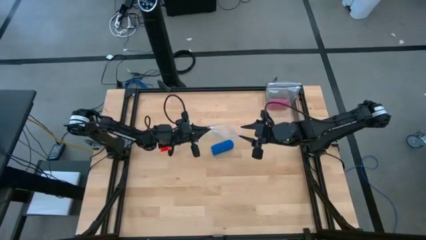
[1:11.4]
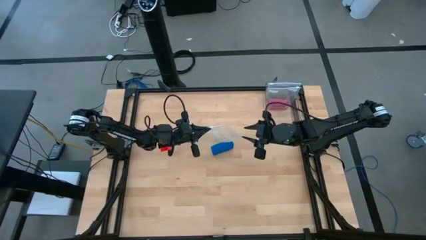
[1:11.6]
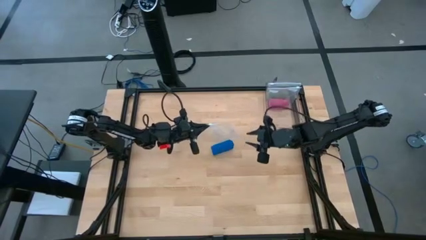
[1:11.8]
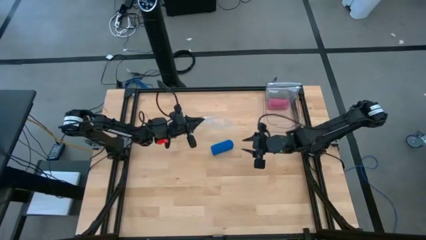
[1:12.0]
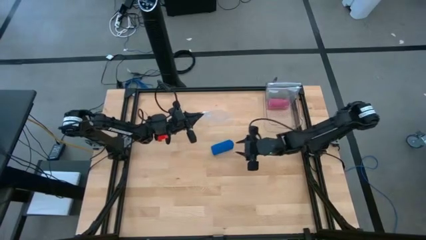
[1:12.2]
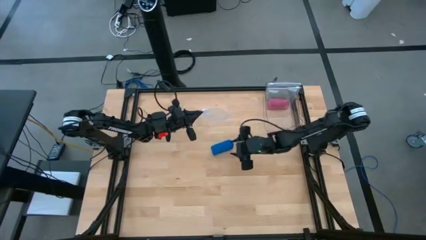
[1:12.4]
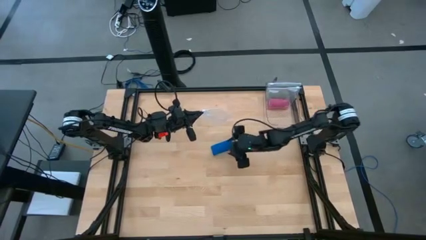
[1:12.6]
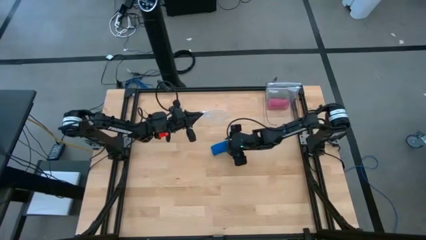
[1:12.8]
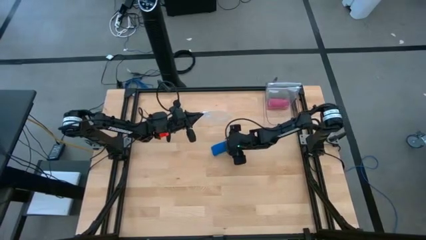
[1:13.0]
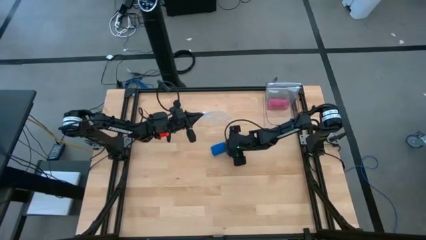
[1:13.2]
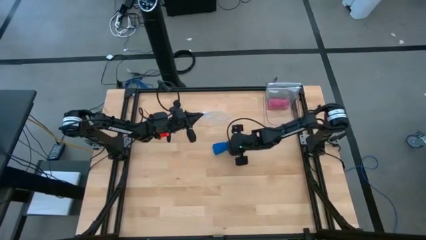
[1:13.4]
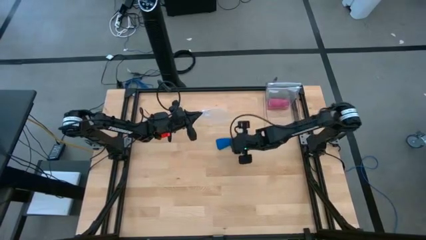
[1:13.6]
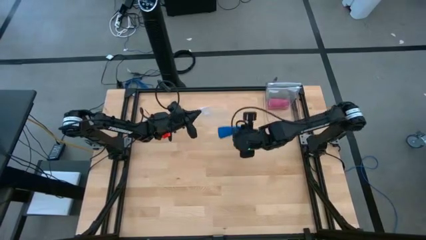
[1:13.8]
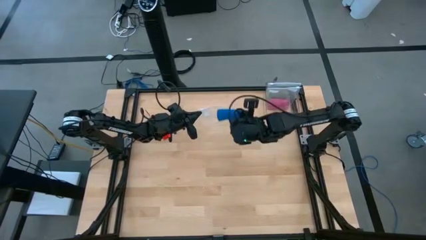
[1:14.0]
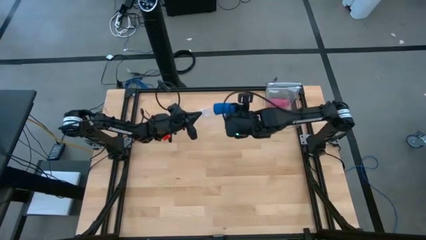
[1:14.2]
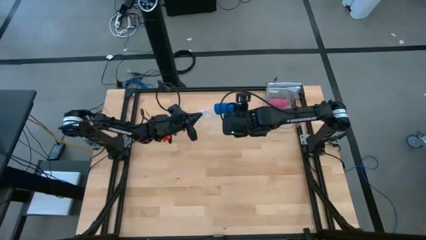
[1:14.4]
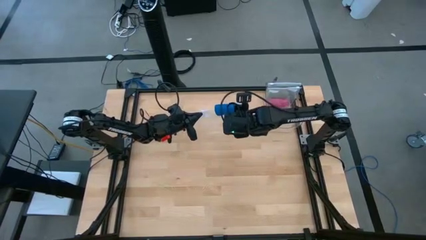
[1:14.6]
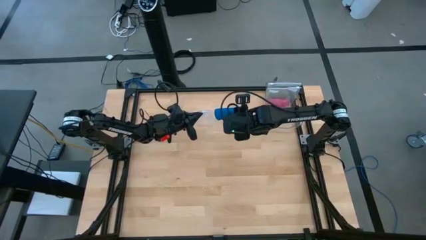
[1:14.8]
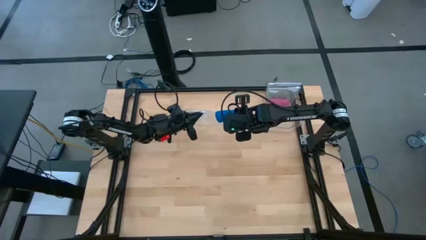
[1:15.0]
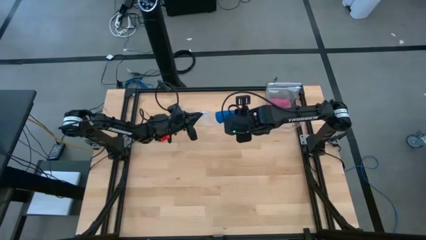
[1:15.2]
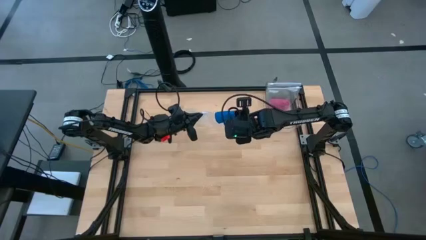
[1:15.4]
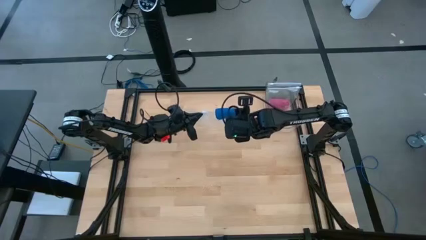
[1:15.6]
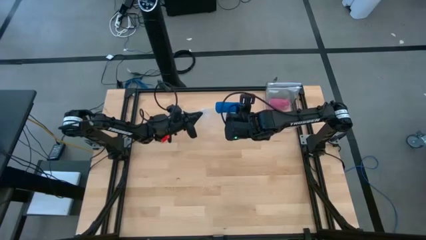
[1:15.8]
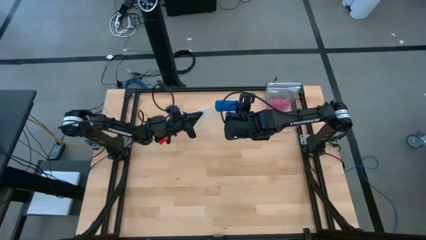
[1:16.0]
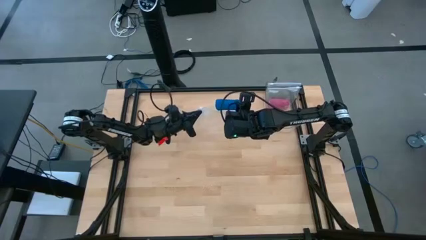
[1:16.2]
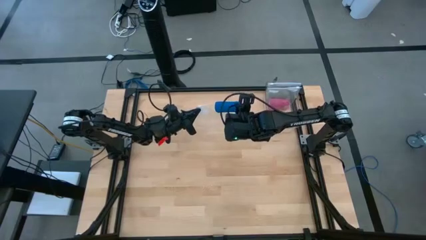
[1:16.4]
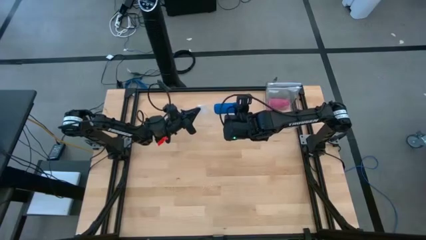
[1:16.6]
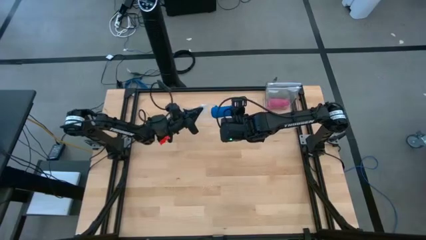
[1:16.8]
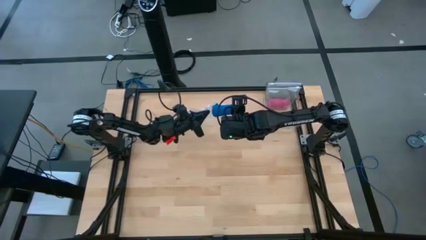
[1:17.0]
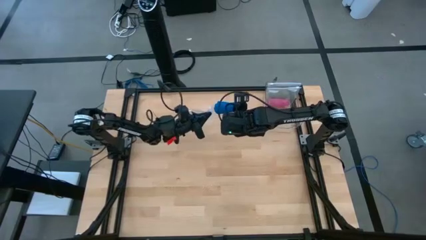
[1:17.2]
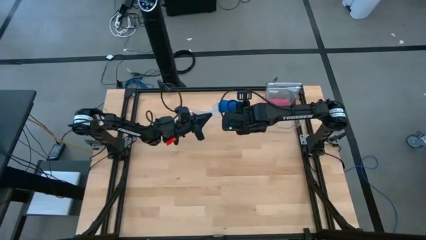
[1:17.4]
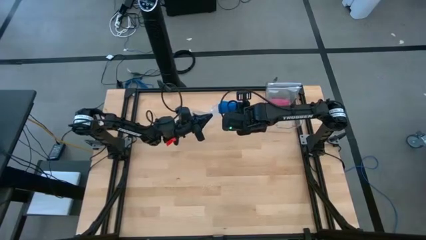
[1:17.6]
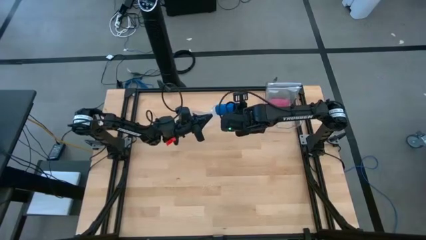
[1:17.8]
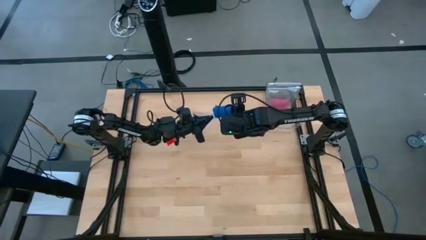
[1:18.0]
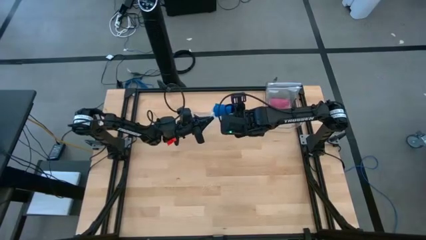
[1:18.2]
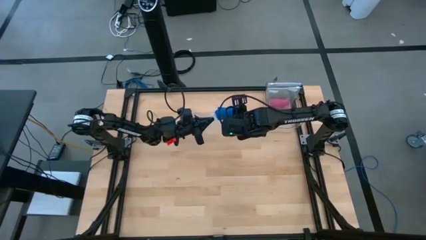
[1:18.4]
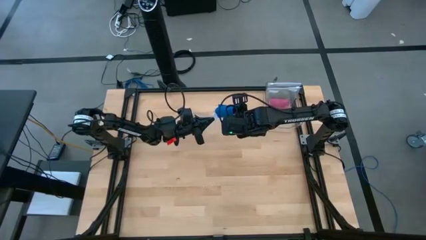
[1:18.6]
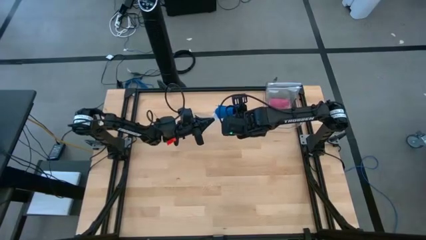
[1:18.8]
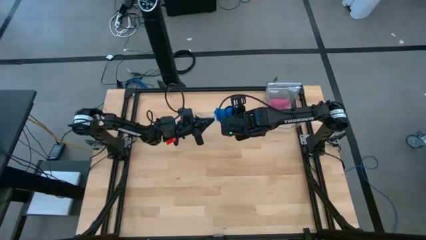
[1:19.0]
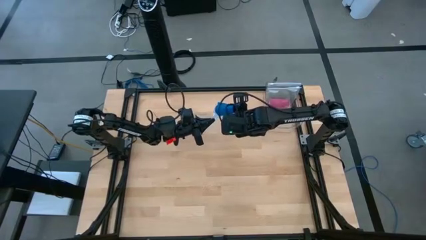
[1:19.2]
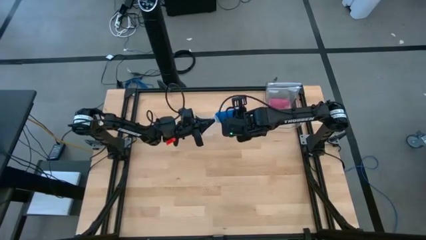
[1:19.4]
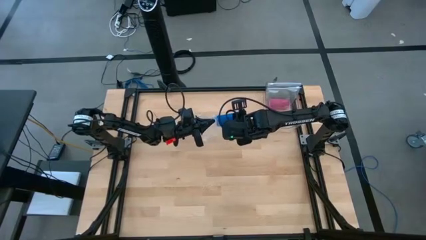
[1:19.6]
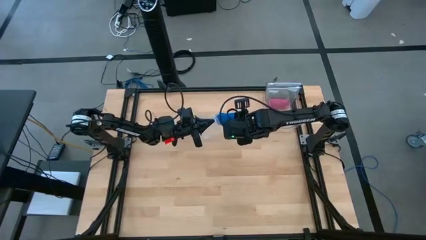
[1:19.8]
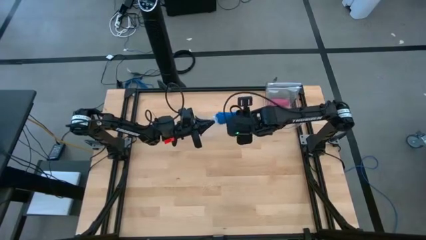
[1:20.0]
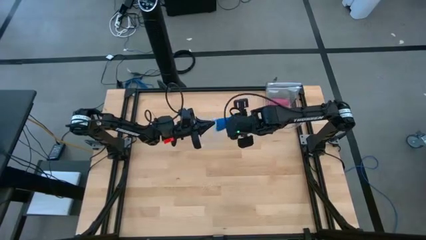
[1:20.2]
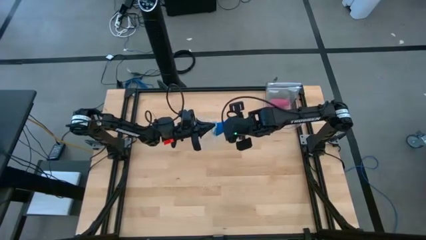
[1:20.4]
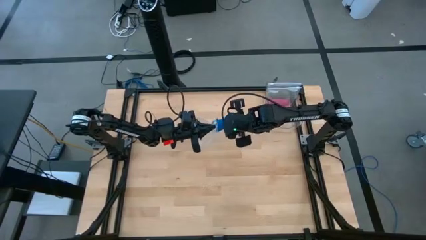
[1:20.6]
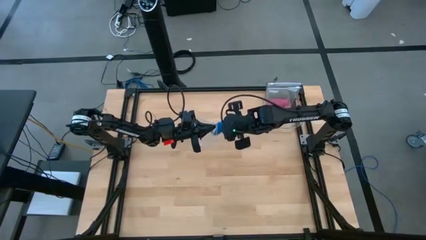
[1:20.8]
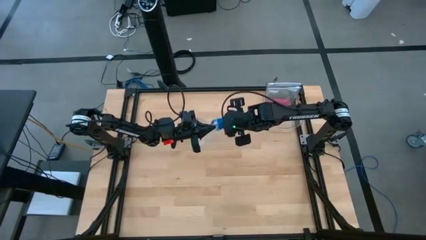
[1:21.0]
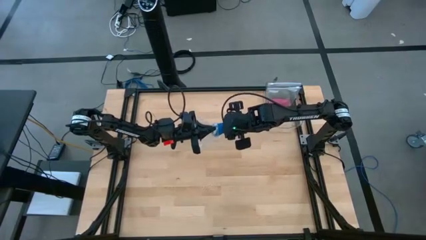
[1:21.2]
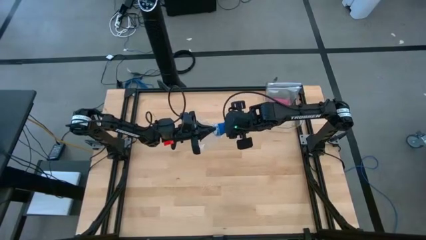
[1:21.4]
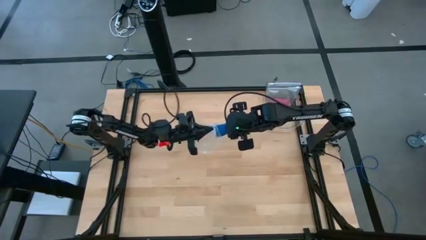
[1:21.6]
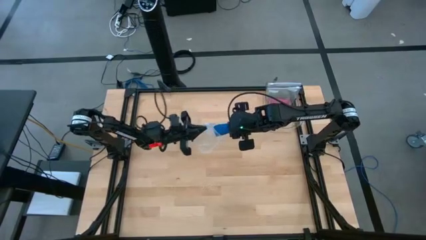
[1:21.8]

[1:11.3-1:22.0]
Task: Roll bandage
Put the blue bandage into the transparent zip bag

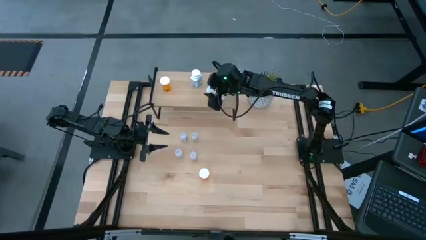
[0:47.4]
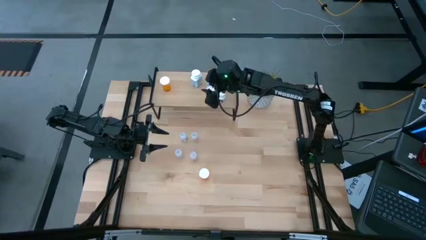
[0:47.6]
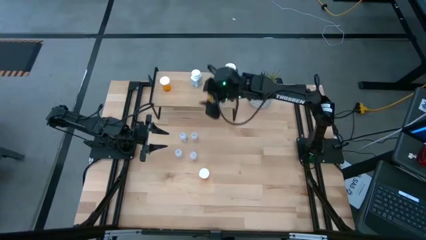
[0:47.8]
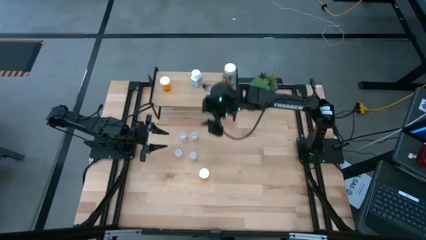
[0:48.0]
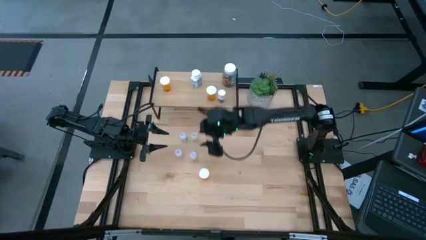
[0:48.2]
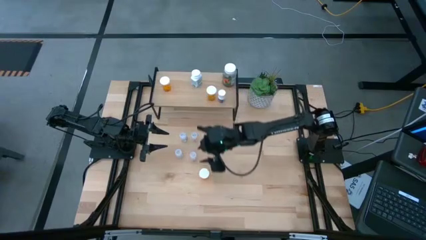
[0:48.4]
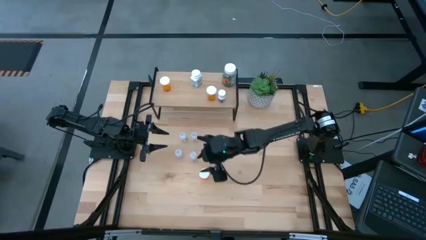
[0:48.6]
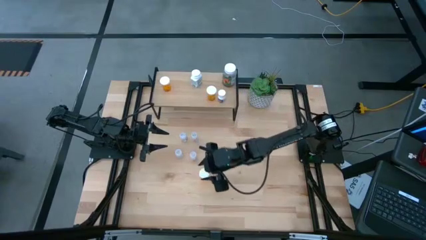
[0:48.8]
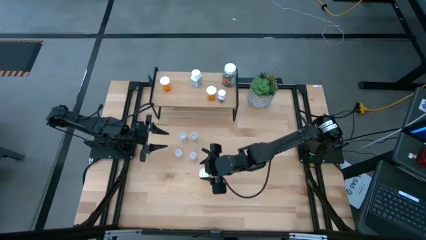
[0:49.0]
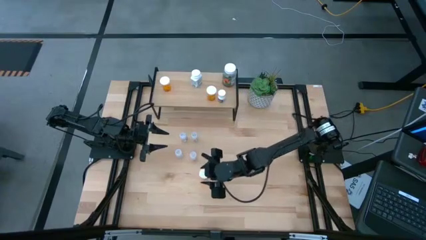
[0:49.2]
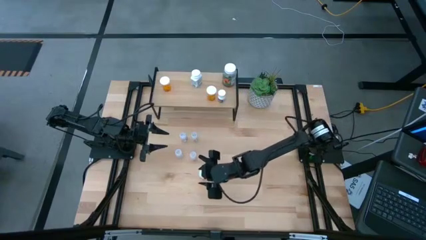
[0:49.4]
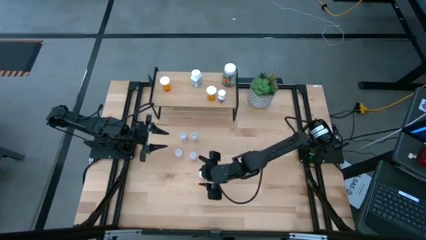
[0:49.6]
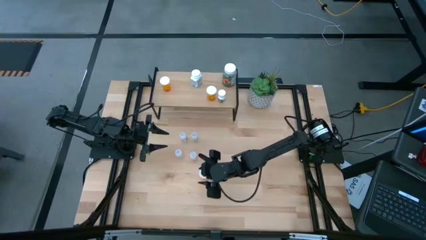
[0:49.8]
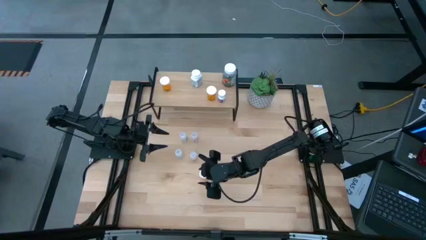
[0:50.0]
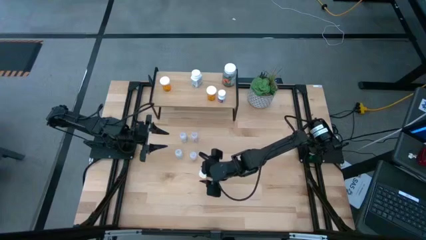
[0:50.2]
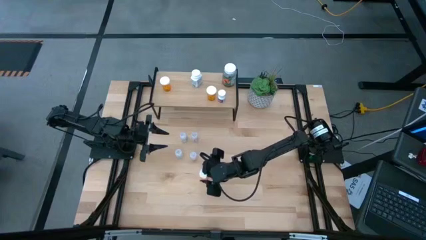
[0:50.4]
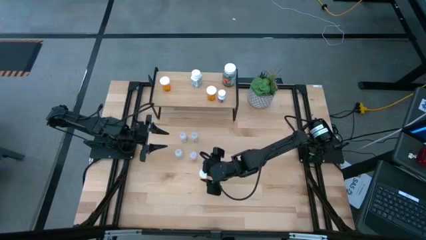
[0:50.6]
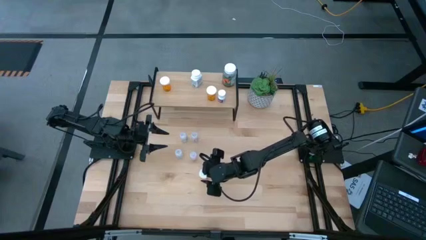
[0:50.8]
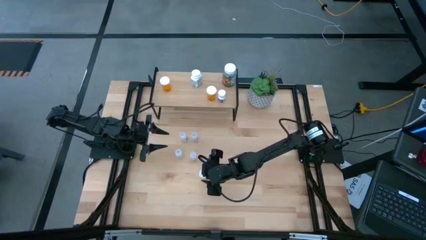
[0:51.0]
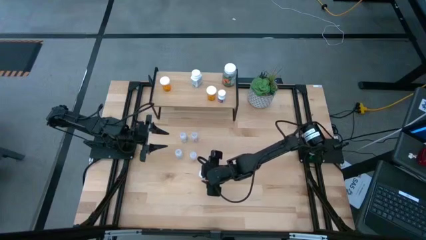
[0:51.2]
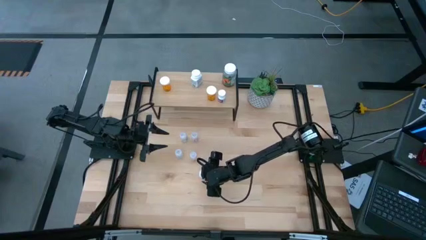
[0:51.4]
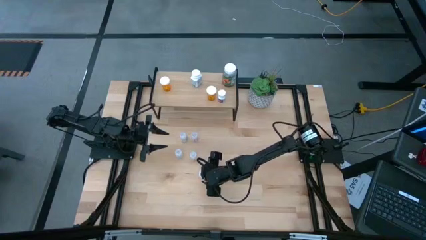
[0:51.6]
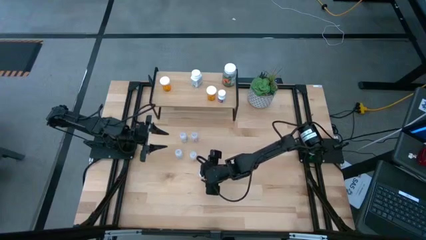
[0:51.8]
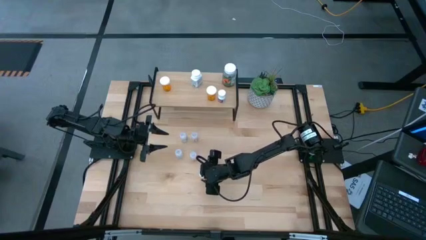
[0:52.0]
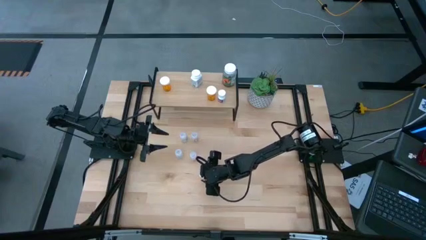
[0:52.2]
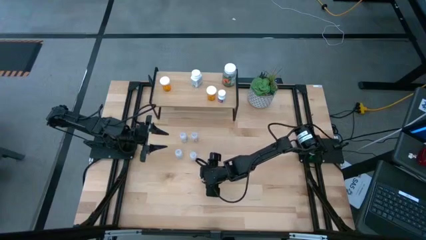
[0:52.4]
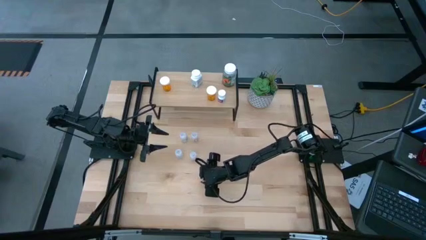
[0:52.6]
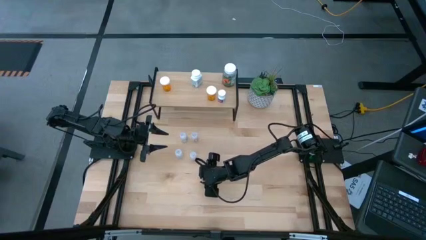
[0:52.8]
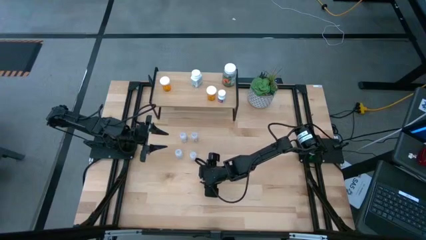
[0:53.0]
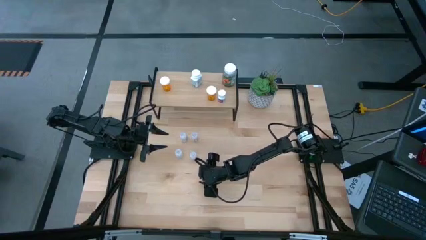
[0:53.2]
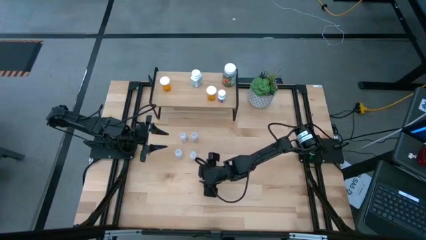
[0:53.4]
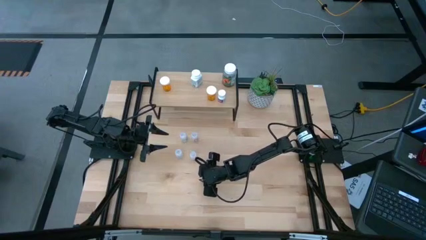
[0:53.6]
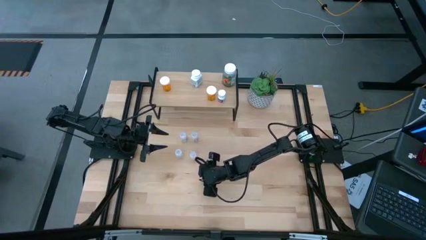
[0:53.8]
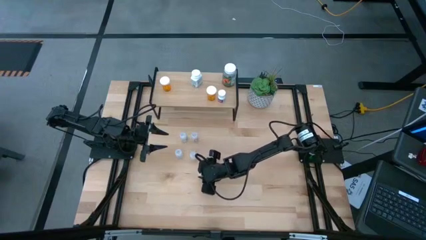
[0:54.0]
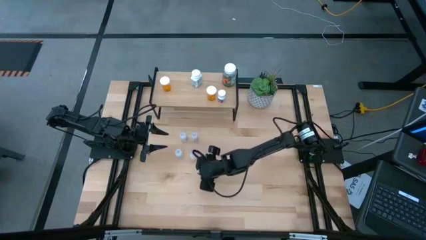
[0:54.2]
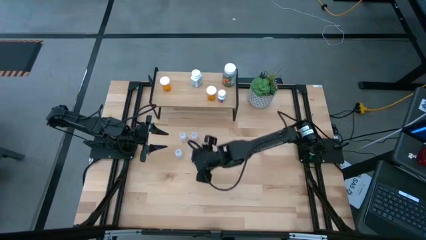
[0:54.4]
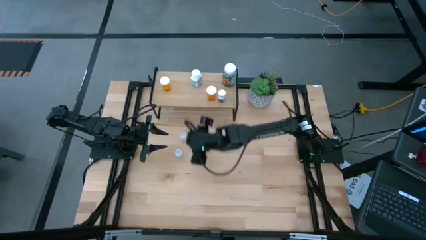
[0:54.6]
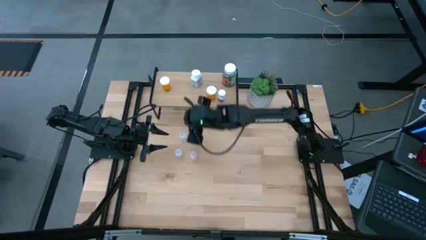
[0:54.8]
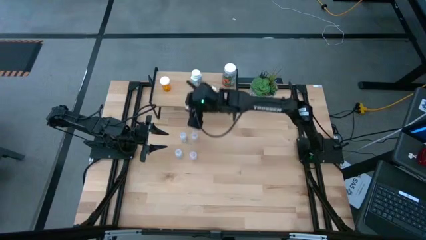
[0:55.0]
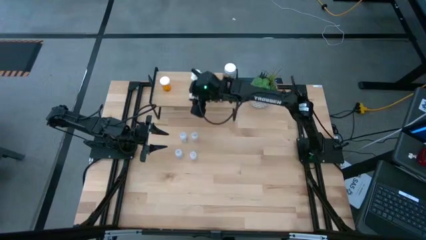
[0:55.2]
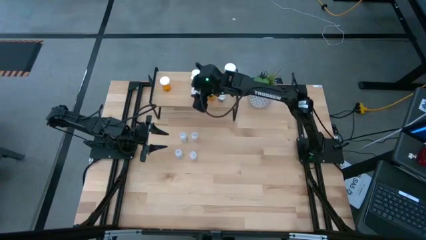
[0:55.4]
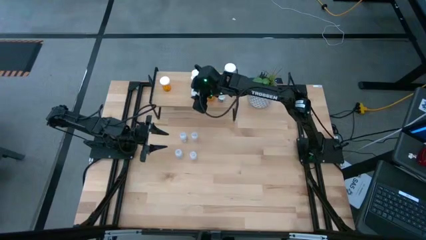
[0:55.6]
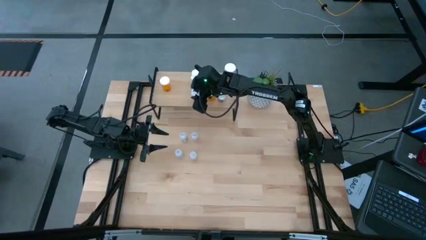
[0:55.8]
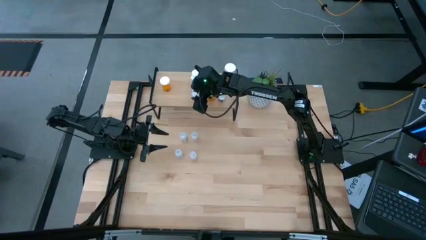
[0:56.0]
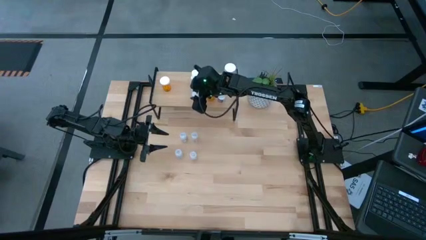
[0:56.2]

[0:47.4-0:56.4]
Task: Pick and place medicine bottles onto shelf by color
Put the orange pill bottle on the shelf
